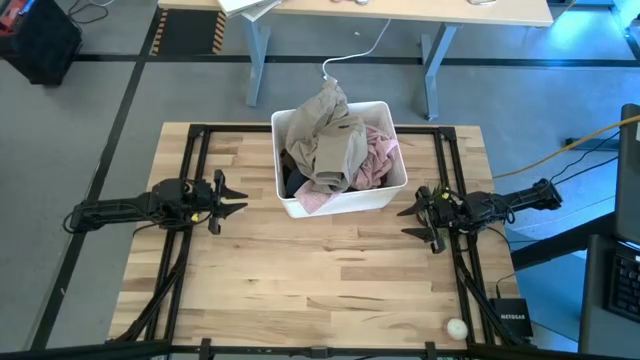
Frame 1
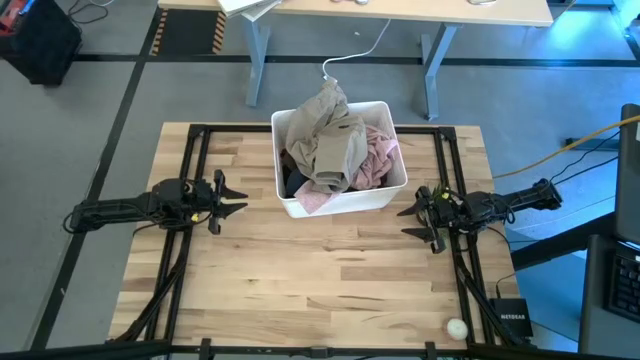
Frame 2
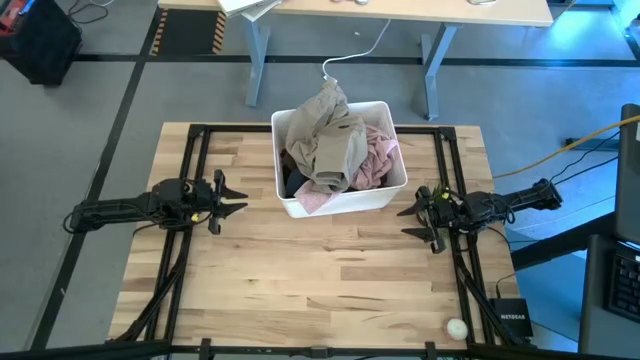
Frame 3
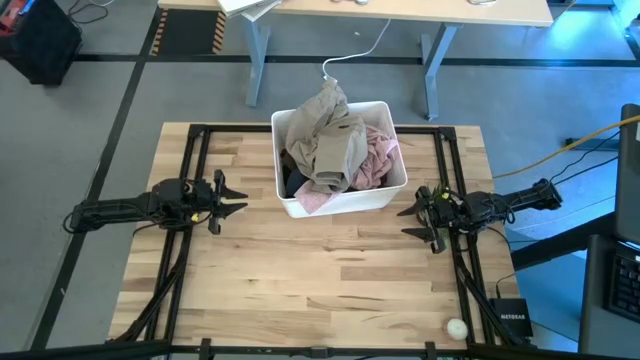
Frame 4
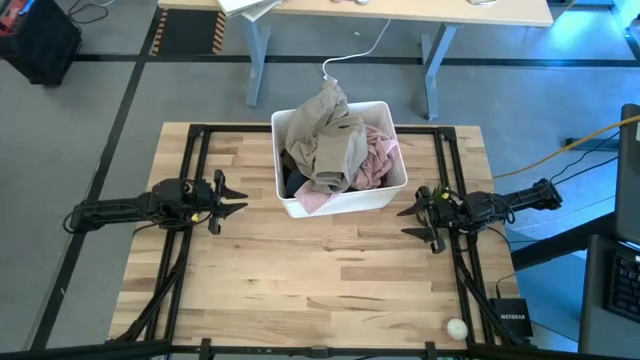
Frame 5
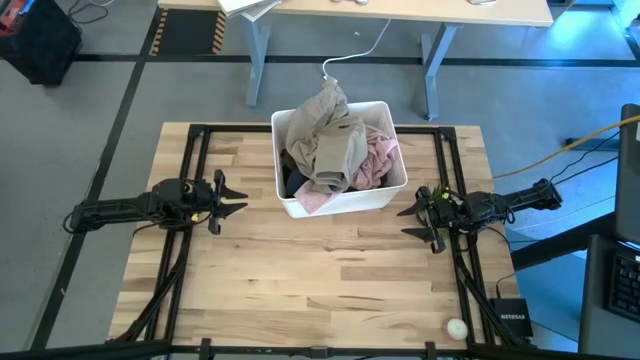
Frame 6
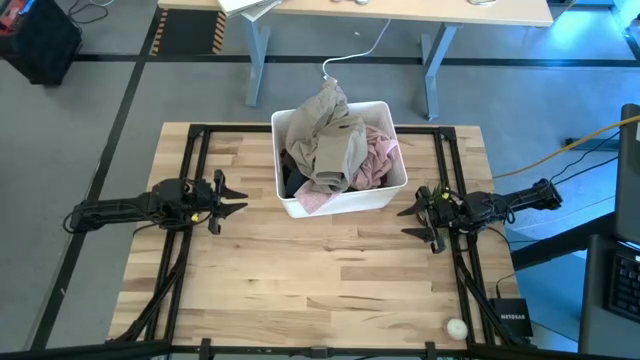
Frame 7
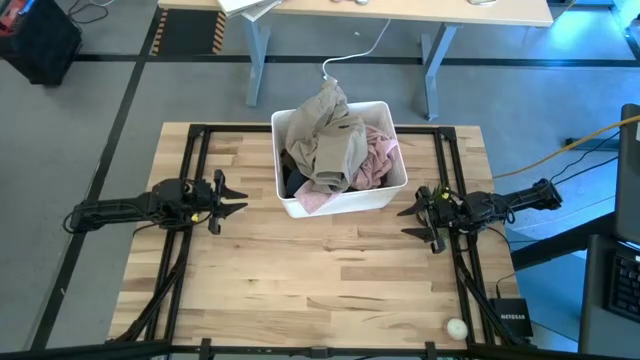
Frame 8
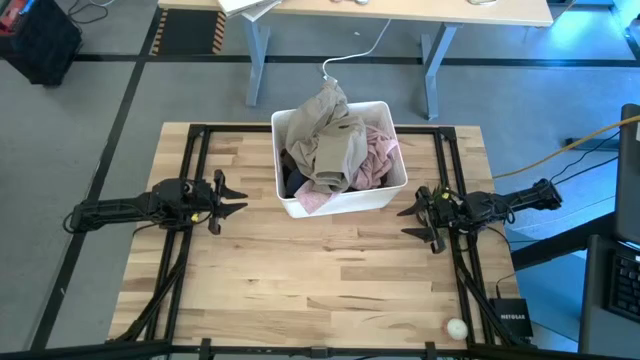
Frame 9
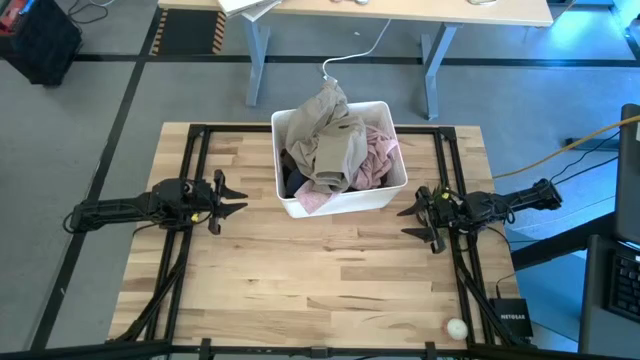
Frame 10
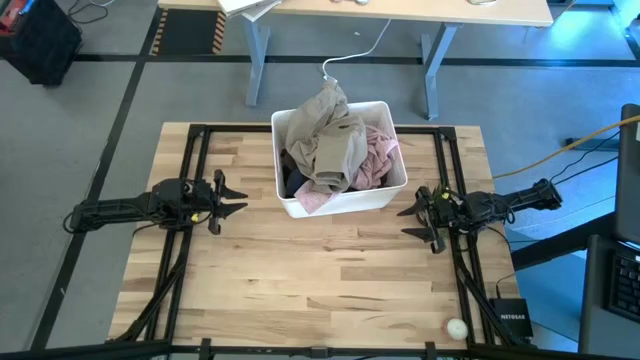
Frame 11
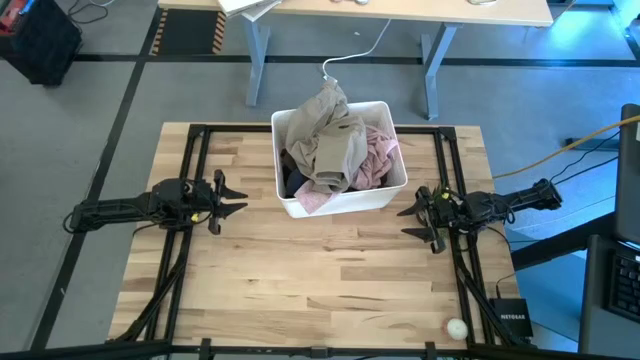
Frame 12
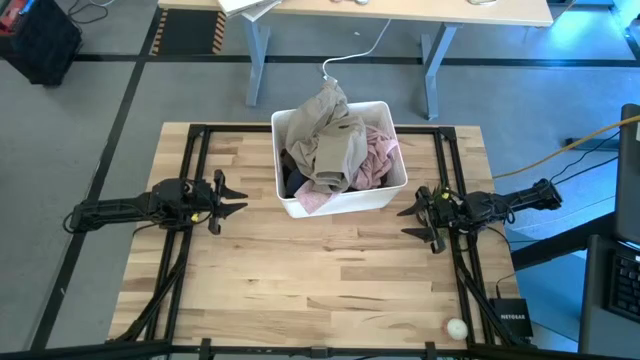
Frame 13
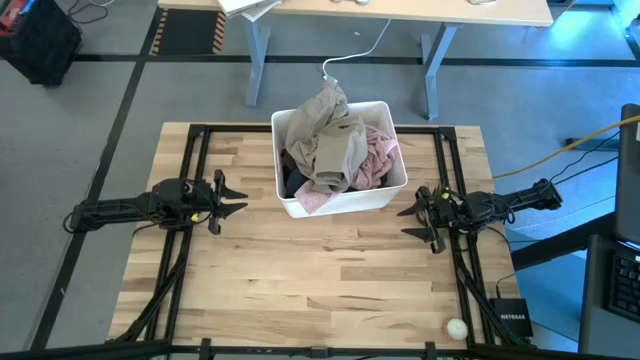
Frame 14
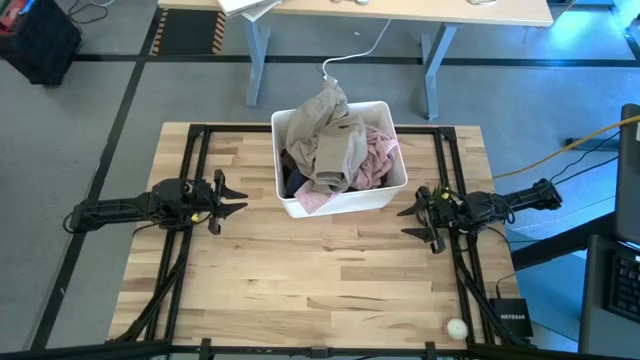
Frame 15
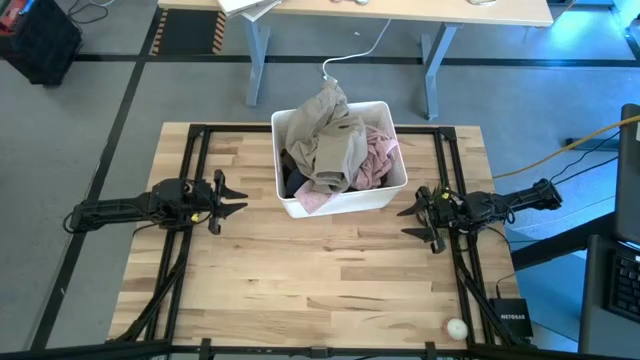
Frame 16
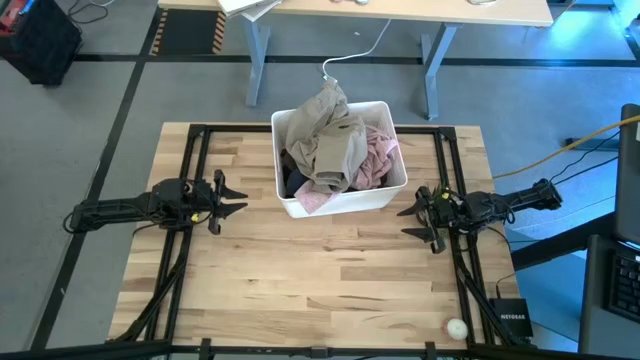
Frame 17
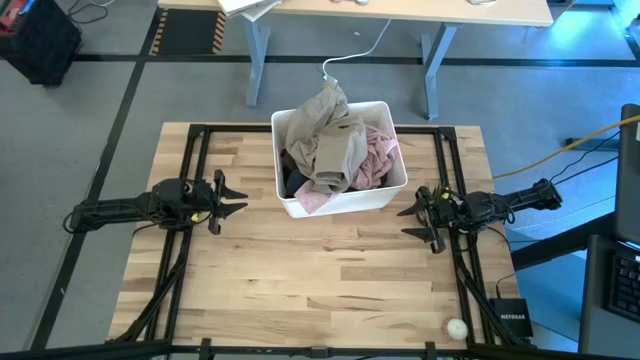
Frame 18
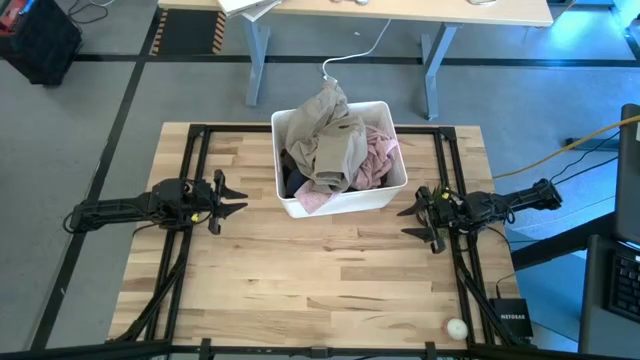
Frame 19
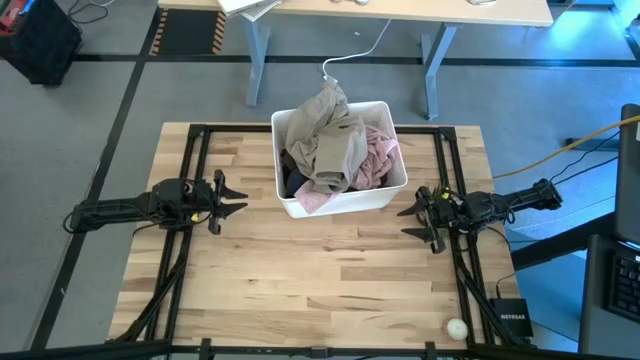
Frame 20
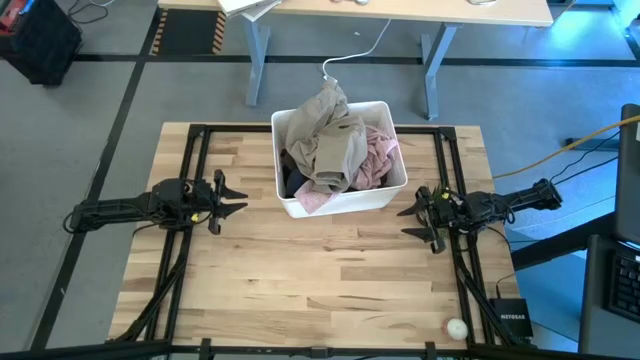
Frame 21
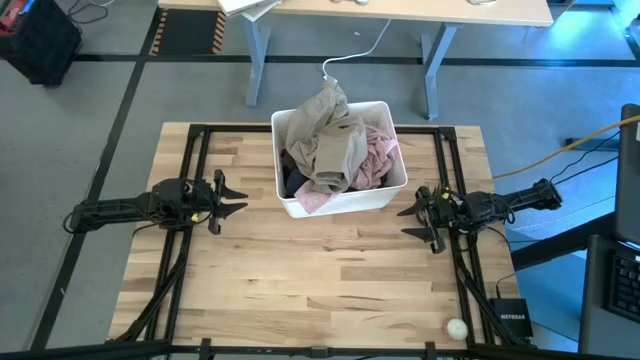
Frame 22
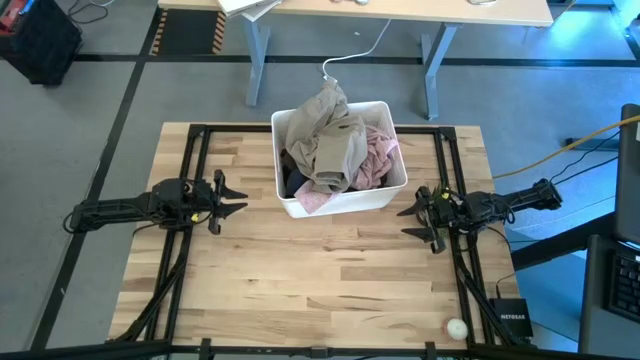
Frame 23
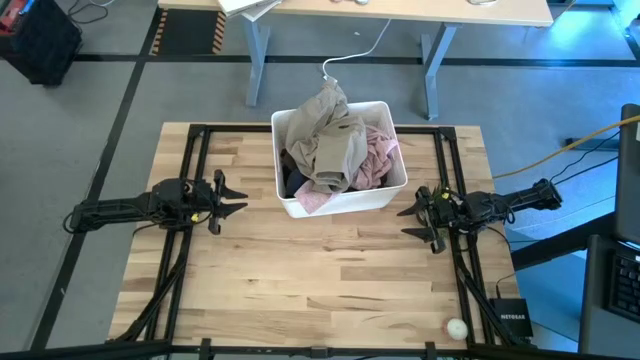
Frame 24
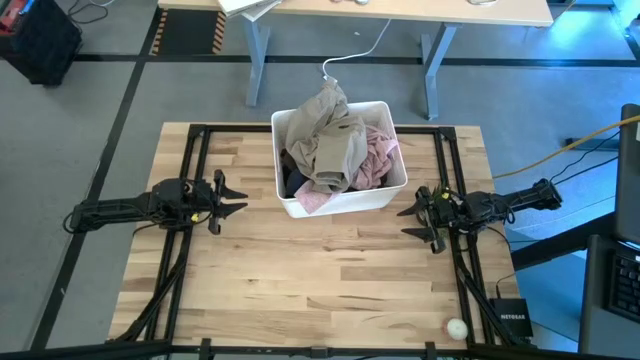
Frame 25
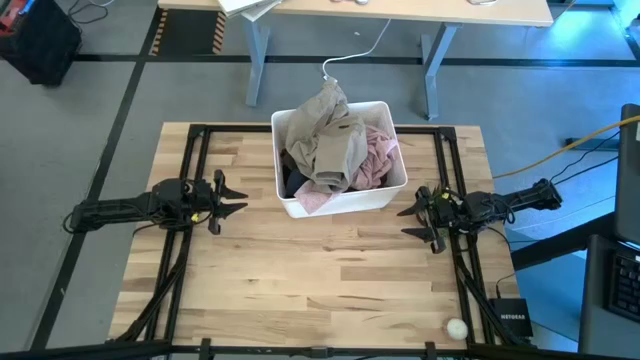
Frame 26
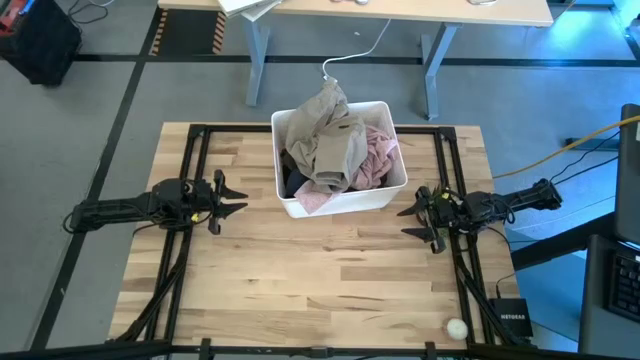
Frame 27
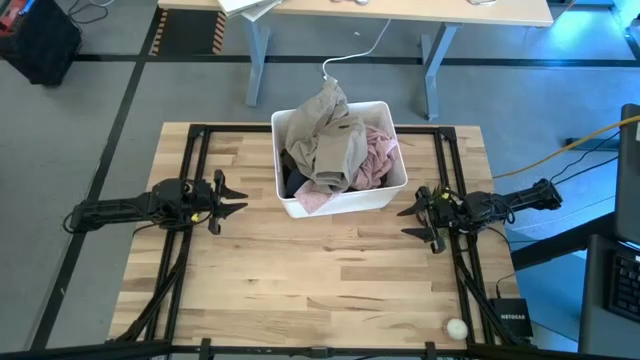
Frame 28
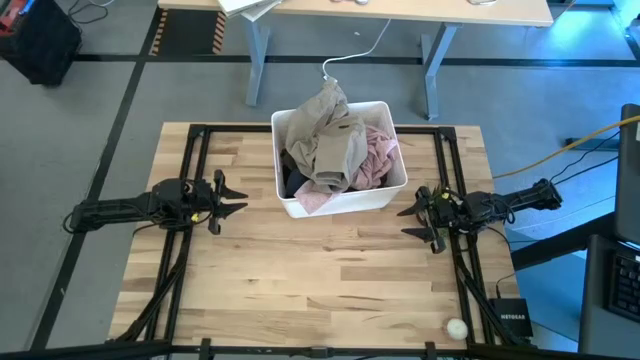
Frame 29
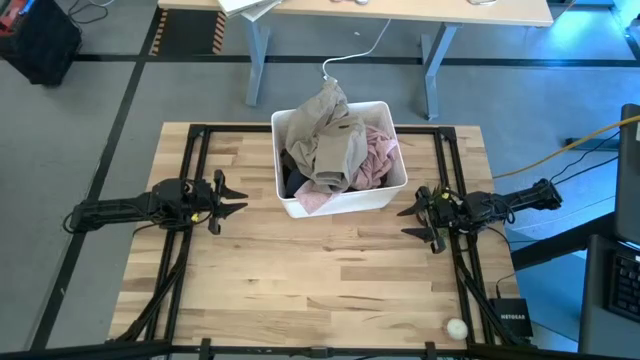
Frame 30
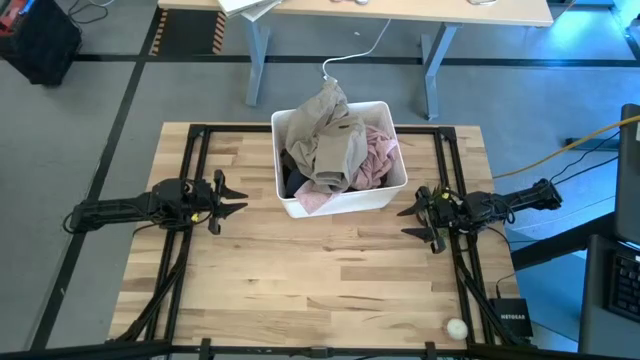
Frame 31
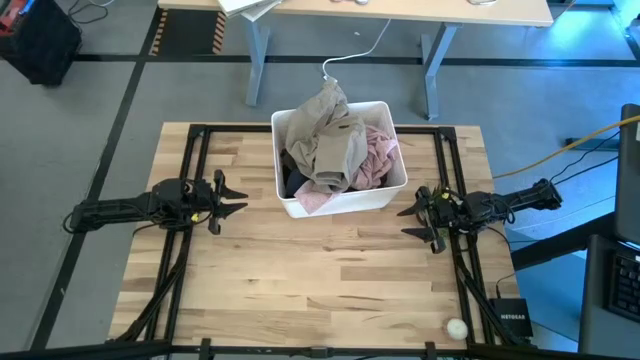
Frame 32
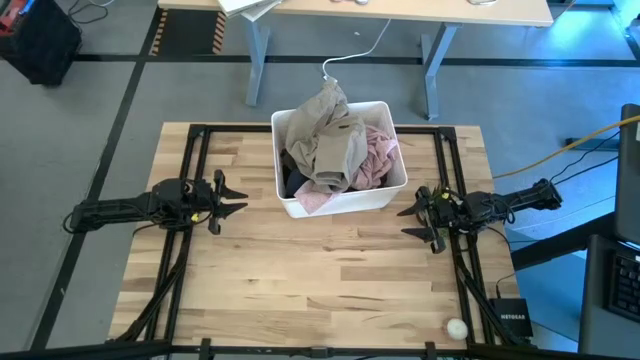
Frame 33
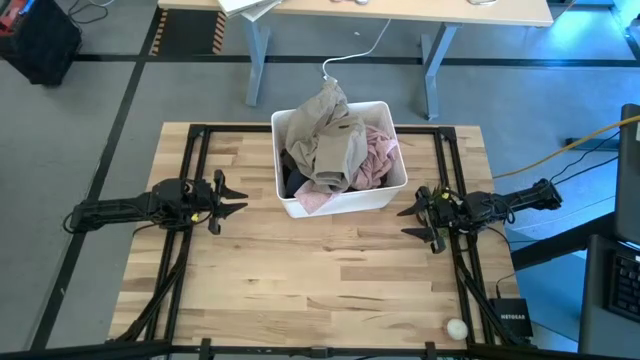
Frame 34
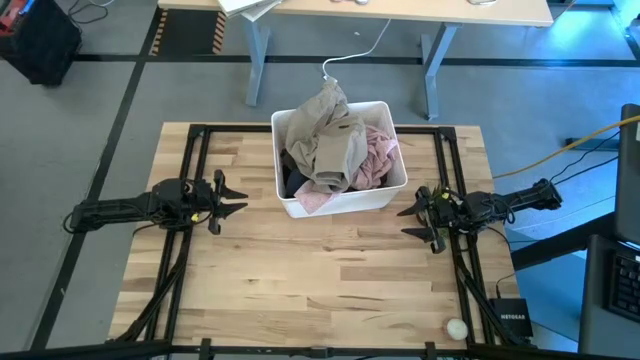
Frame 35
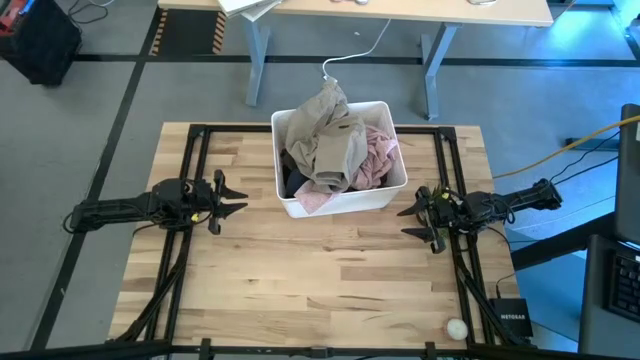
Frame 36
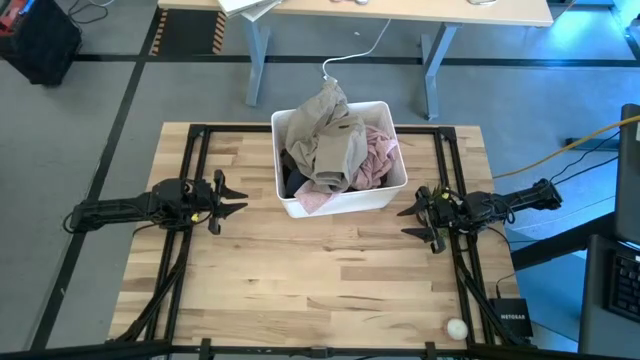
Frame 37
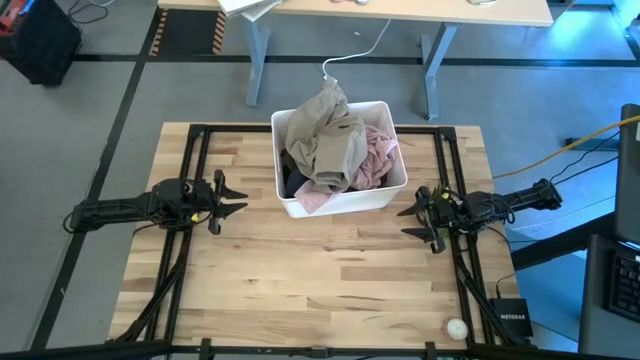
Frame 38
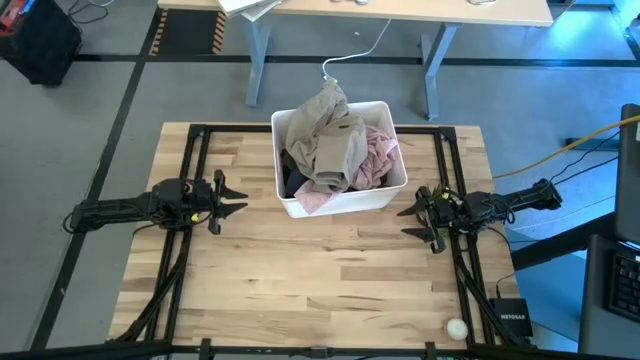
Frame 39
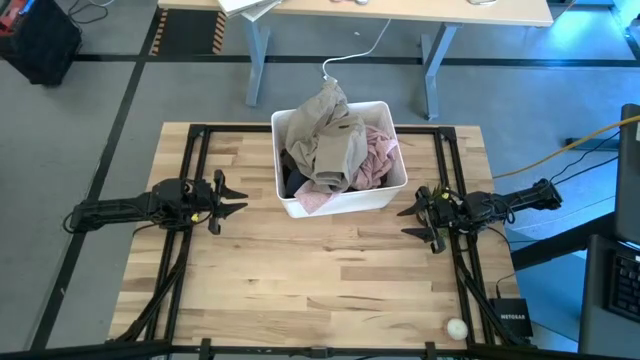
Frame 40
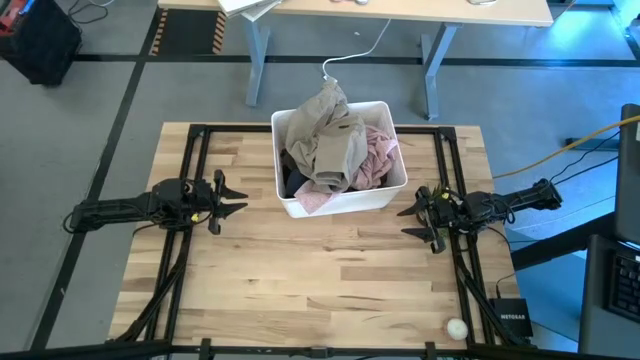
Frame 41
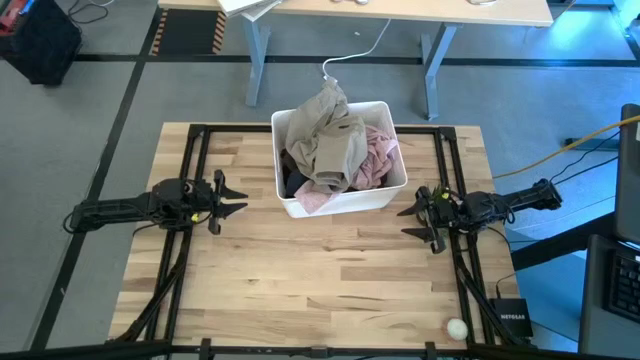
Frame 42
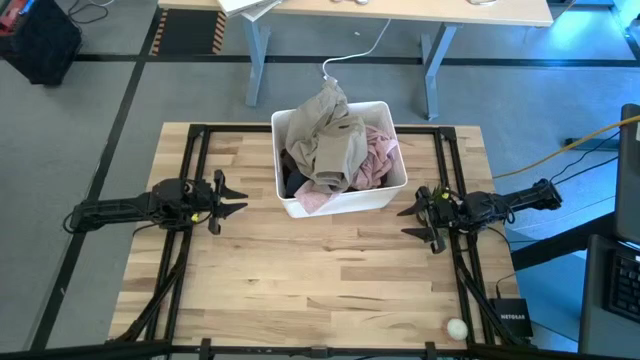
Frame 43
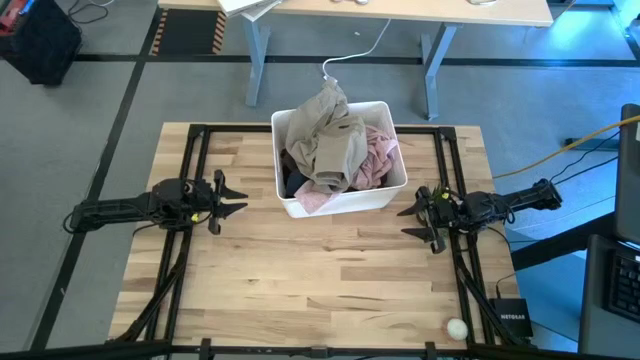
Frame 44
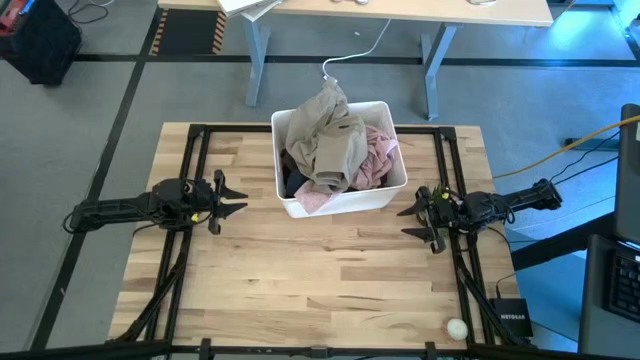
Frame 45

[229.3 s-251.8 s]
Task: Sort clothes
Return to Home Position
